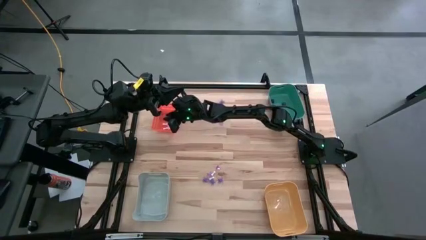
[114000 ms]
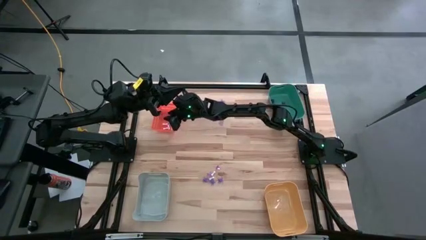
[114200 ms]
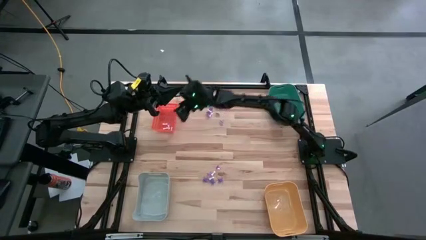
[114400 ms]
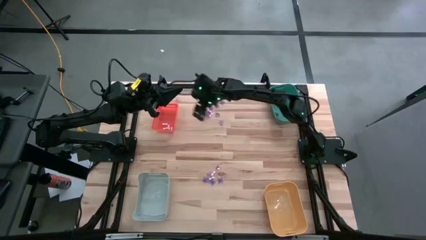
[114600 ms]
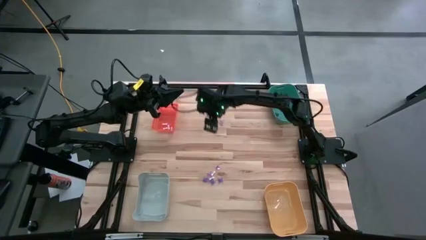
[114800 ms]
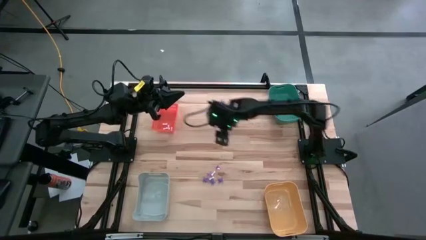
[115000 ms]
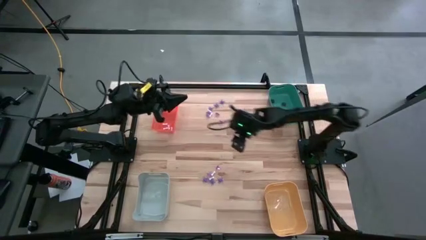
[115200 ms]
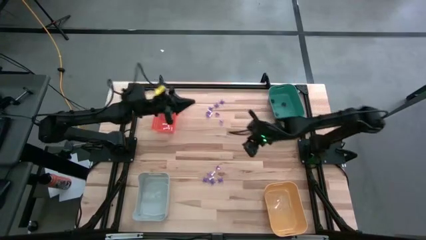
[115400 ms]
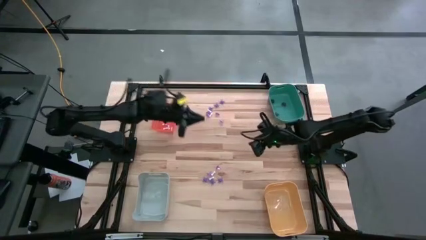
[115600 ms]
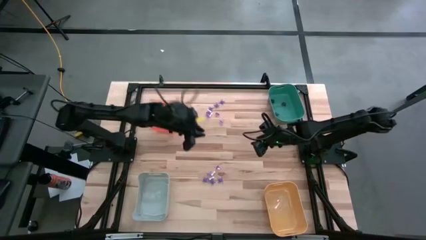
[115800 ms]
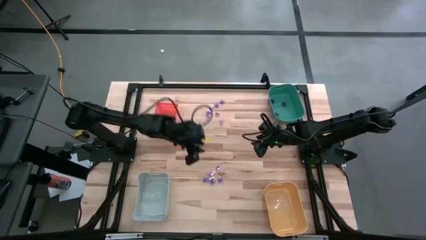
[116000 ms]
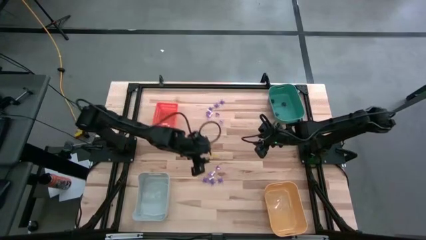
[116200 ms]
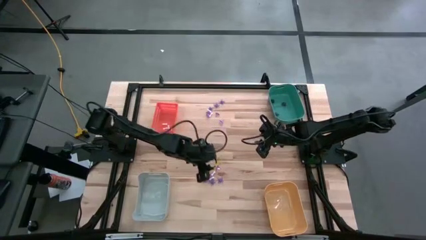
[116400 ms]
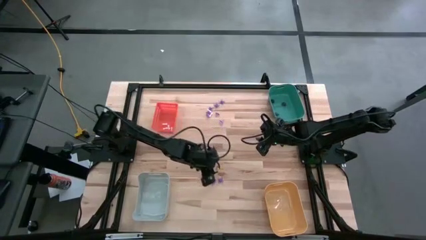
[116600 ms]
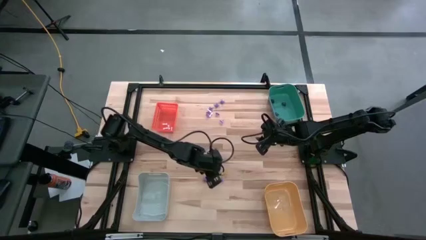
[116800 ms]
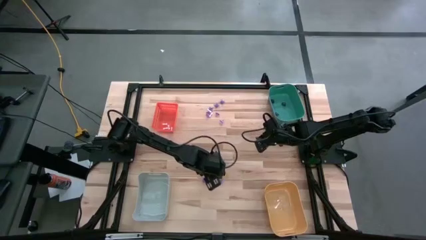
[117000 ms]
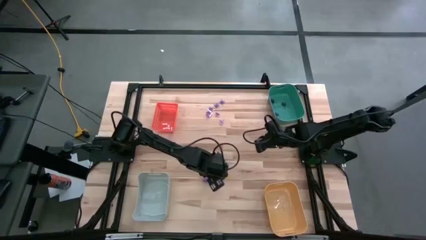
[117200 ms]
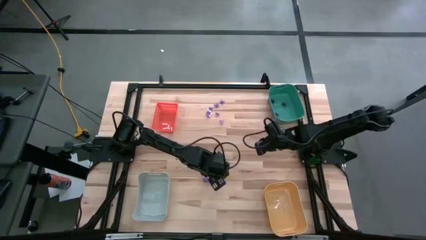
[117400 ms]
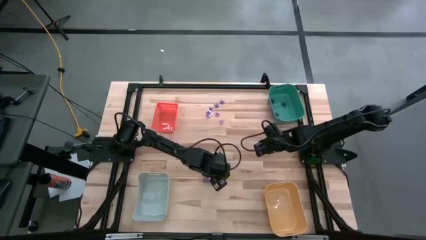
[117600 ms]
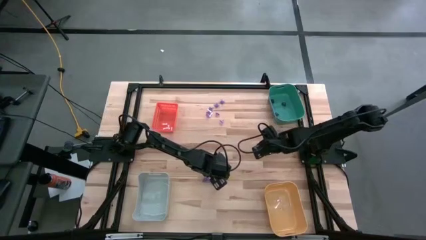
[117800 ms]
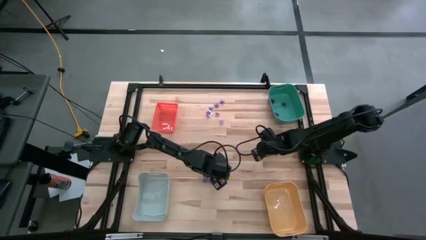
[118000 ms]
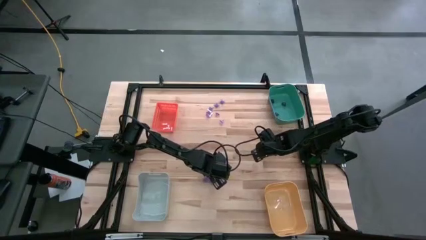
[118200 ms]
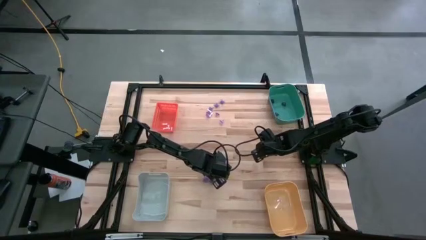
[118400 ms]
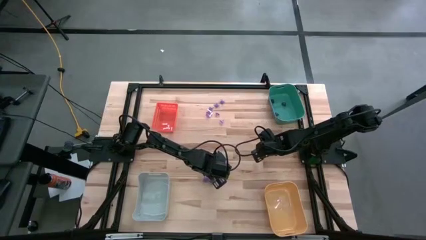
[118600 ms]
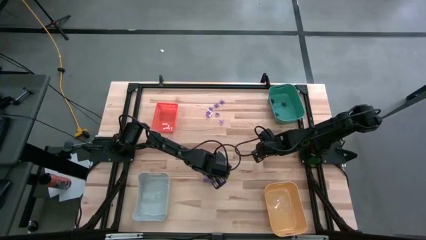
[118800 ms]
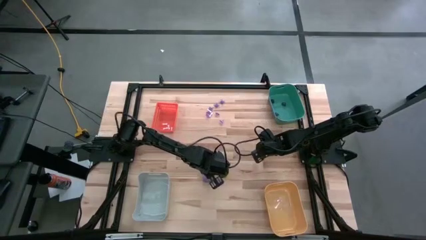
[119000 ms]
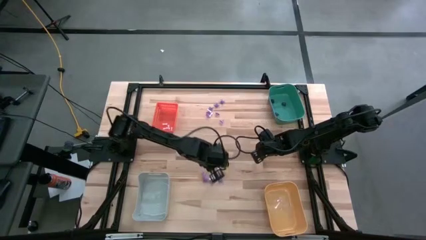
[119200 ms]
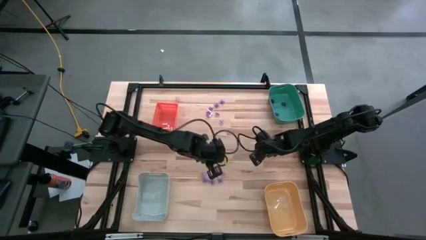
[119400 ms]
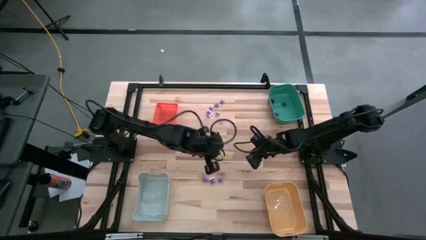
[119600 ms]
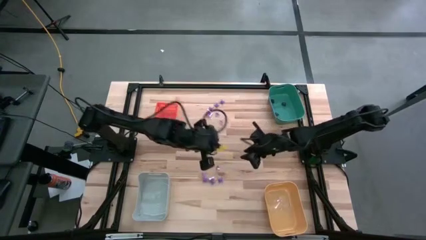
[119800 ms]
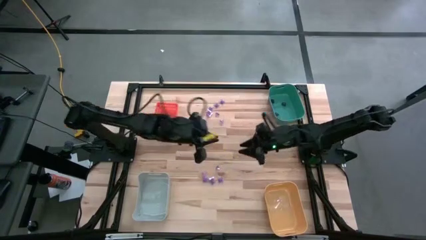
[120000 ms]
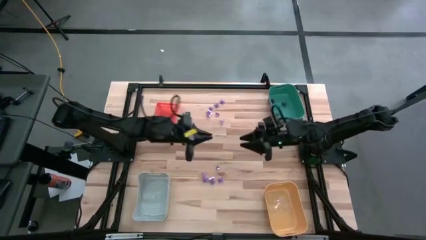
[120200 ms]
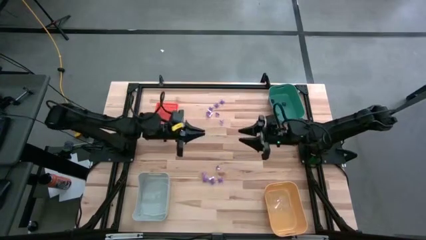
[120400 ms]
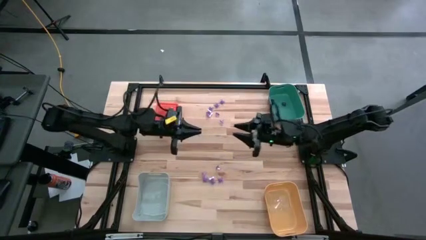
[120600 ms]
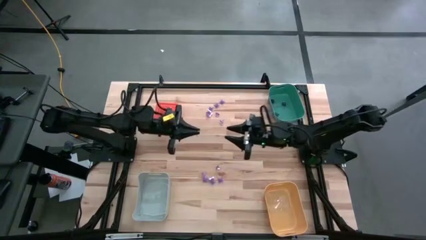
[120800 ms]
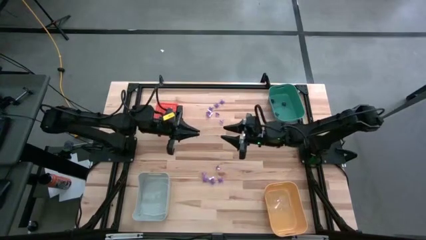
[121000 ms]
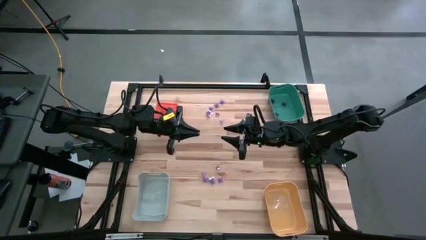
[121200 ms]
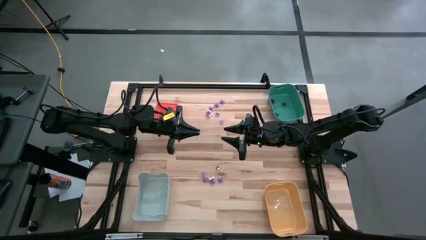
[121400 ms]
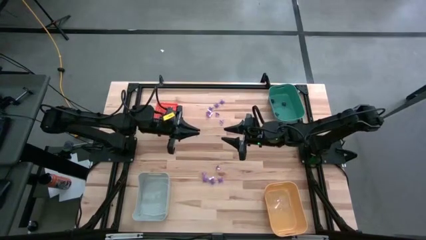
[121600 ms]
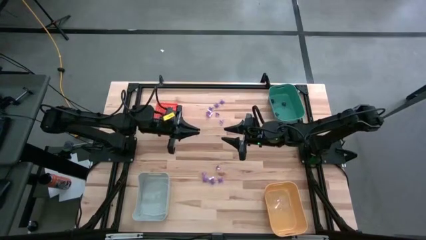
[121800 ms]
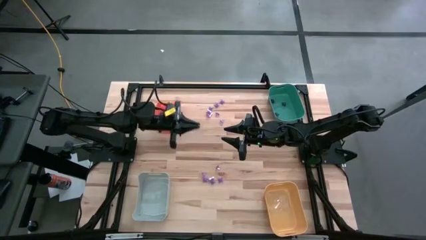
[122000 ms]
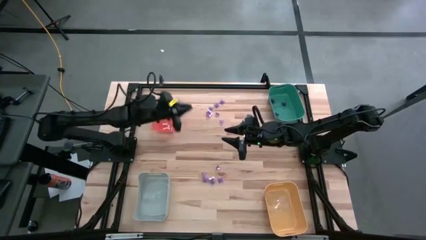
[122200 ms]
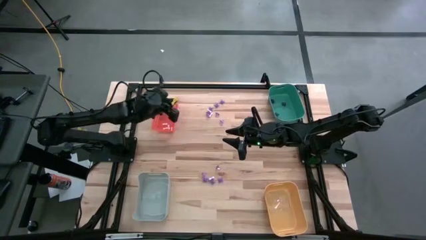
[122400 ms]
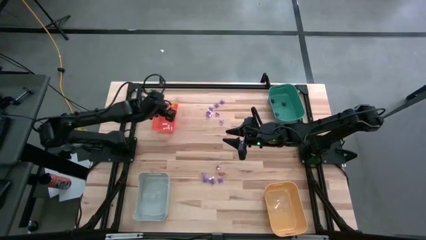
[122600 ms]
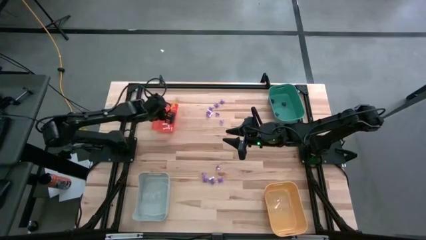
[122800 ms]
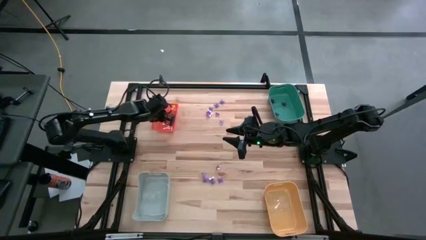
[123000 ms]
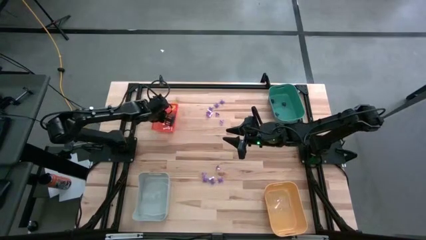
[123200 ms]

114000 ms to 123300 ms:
Task: Sort Halloween decoration
Put the white bone toy into the orange bin
